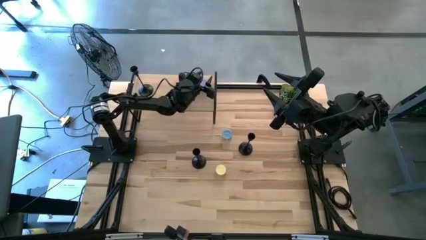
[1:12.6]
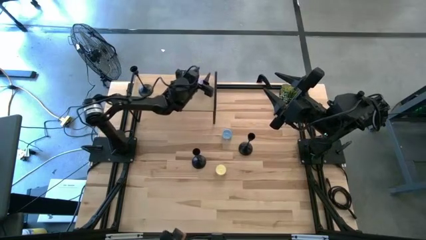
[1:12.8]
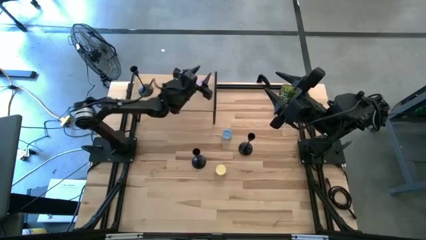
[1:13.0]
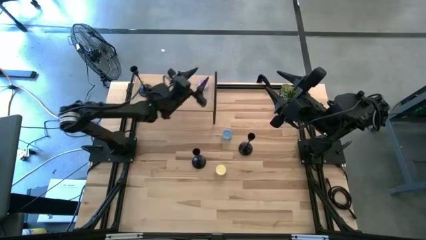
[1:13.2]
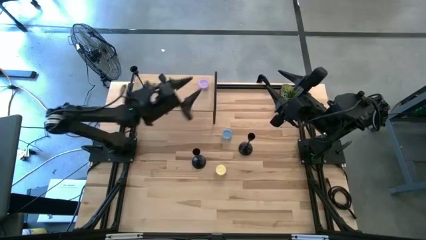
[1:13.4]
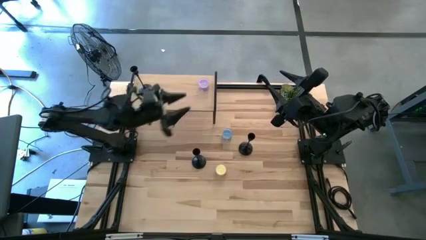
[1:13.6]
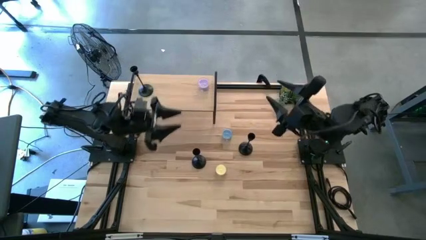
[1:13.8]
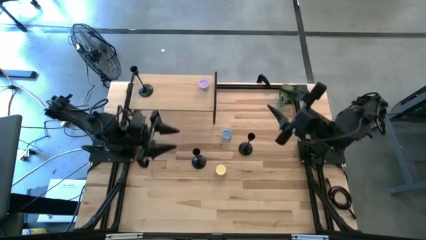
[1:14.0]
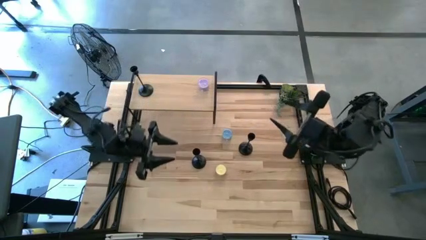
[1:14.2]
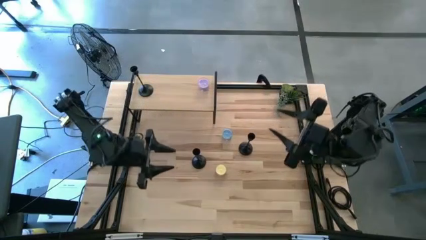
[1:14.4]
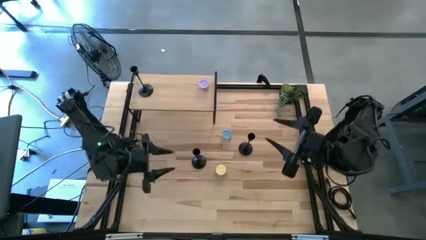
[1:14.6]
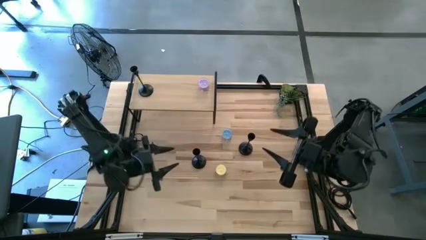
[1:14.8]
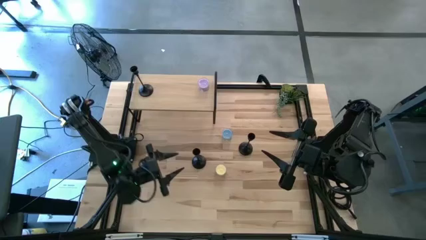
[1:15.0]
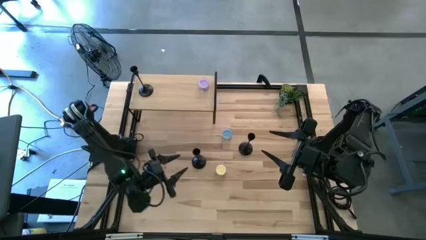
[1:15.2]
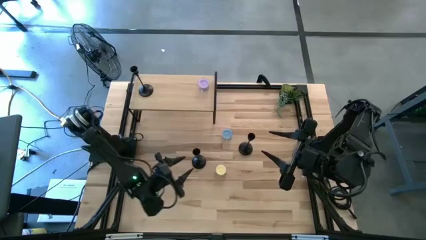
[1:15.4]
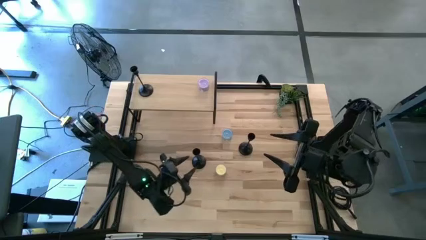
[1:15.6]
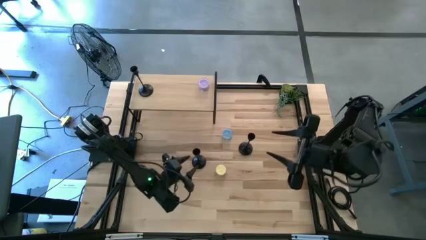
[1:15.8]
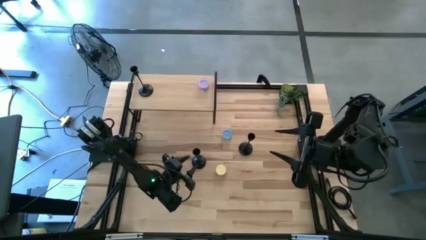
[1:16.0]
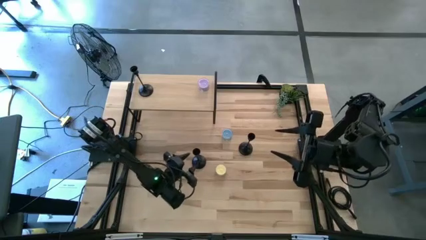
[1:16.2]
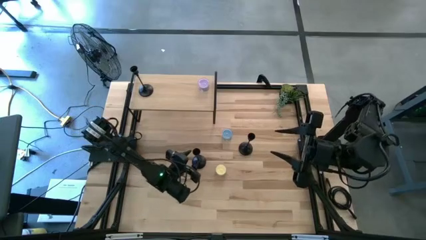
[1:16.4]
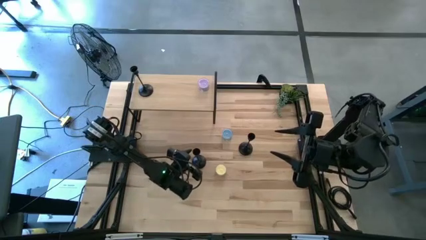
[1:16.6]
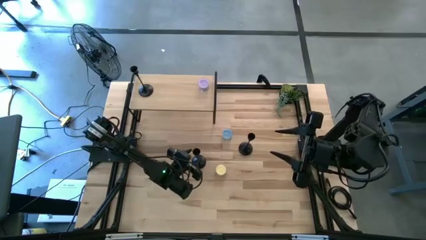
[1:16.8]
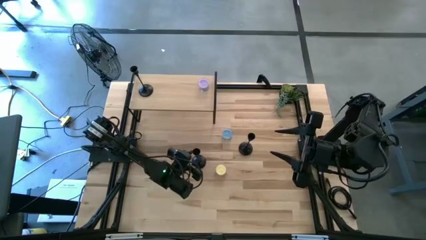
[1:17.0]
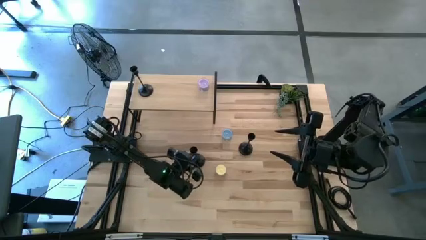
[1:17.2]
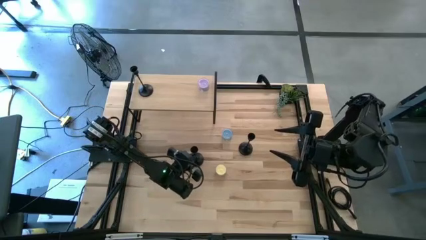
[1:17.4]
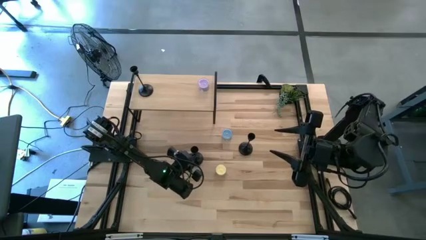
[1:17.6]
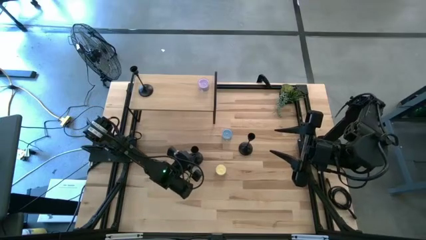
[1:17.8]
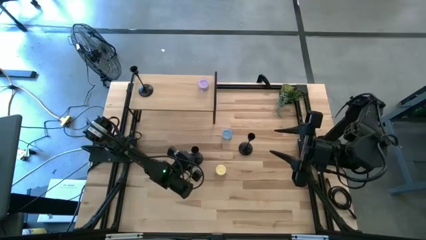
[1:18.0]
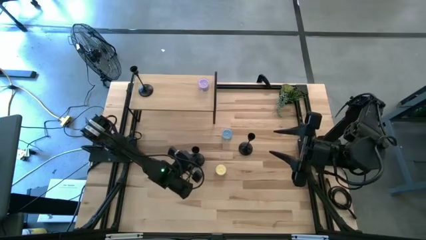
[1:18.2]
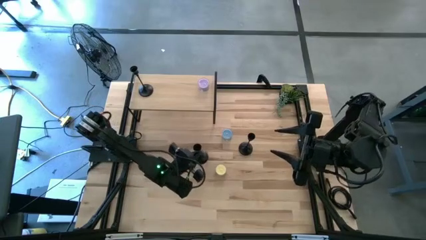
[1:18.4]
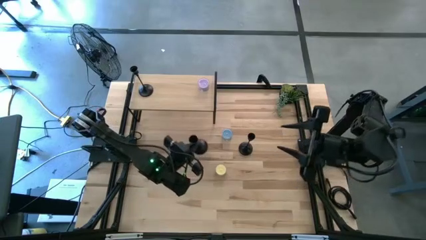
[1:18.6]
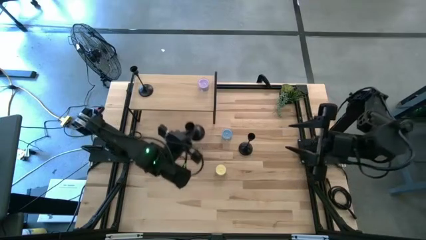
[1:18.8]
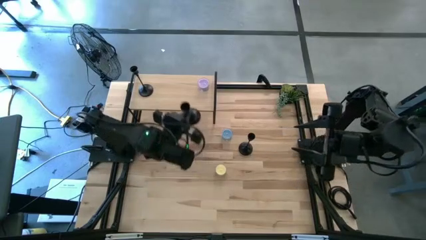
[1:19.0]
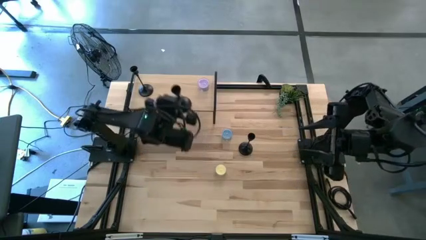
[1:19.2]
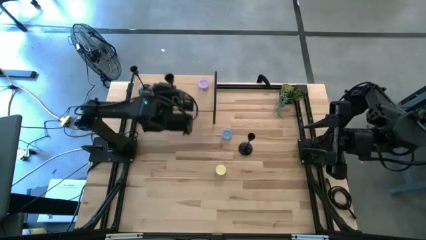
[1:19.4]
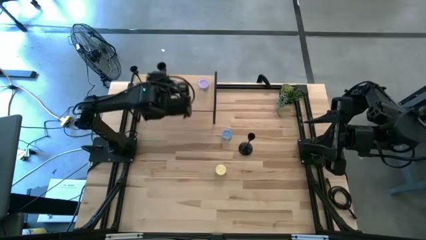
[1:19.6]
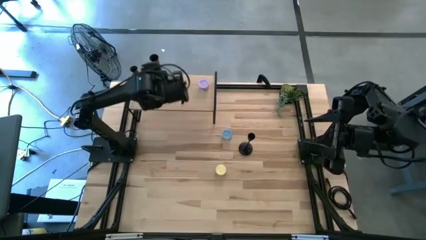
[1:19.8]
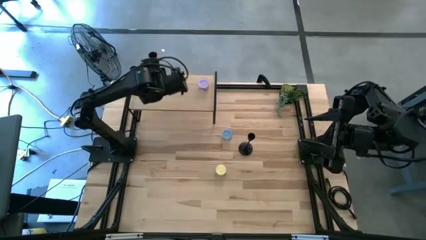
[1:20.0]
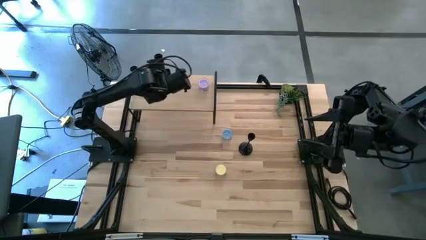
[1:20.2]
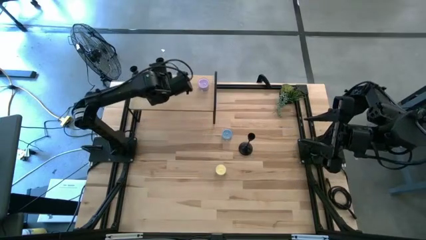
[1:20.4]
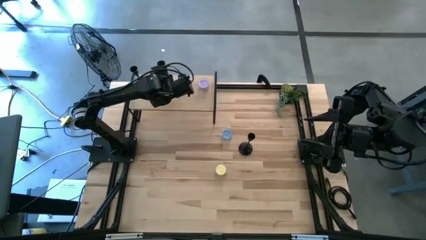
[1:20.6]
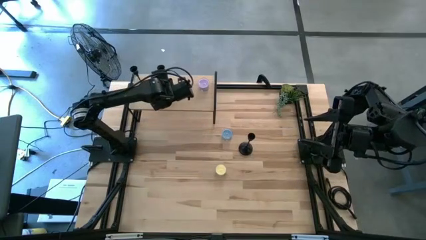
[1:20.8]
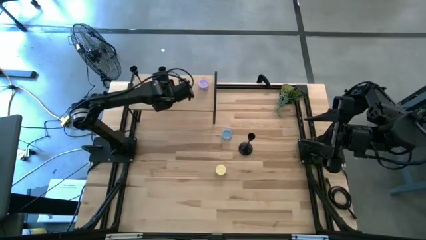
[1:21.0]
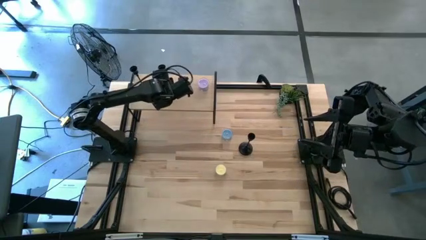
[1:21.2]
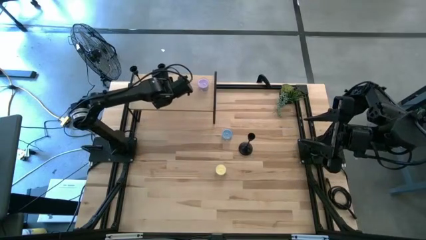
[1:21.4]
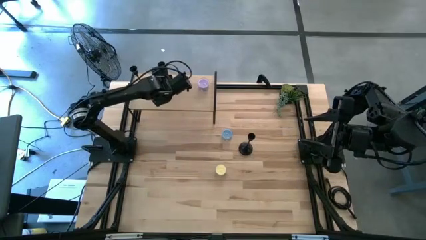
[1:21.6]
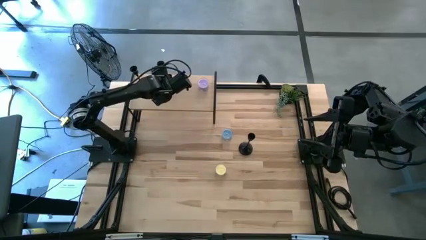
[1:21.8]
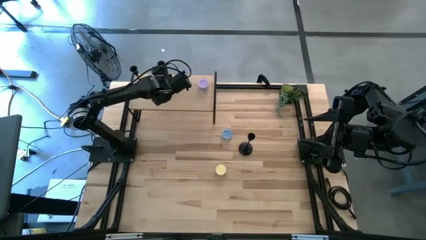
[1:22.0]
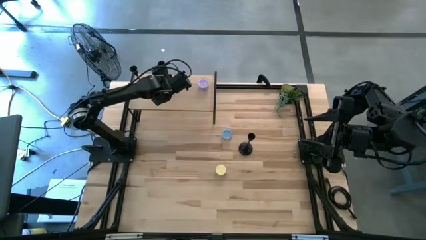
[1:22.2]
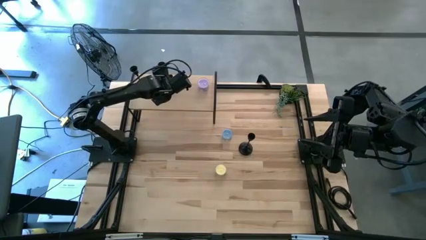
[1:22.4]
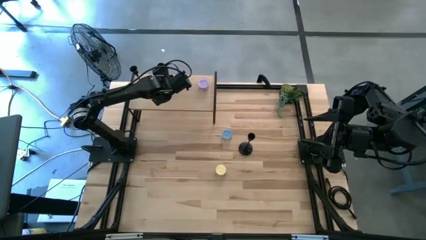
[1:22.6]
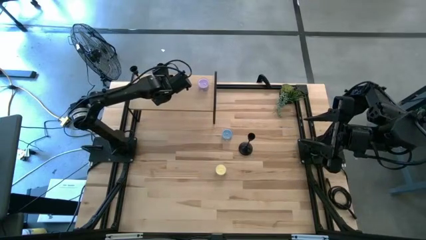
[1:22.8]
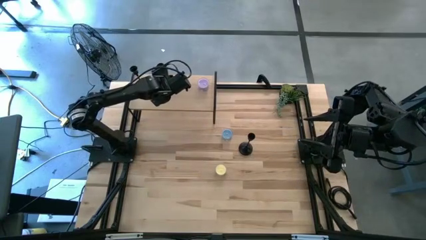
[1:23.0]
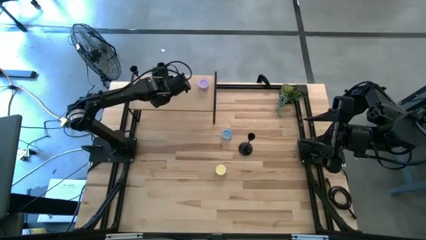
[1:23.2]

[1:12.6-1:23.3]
Task: Pick & Place candle stick holders
Put the left black candle holder on the shelf

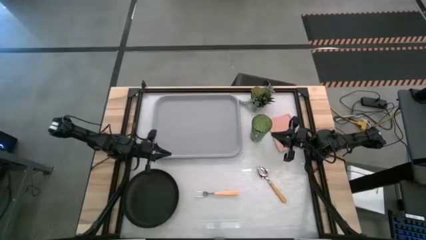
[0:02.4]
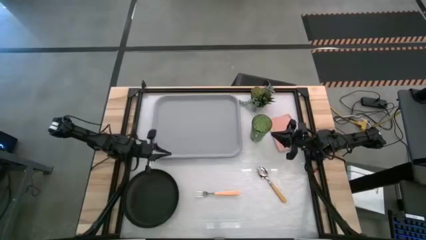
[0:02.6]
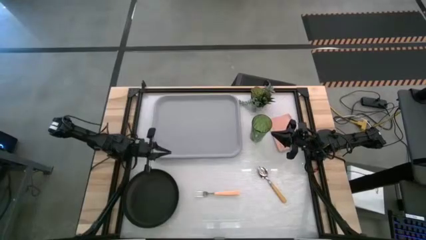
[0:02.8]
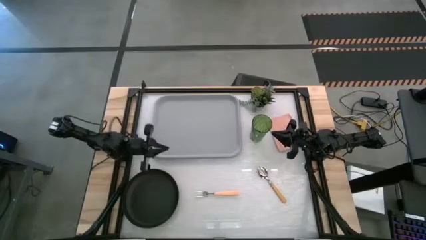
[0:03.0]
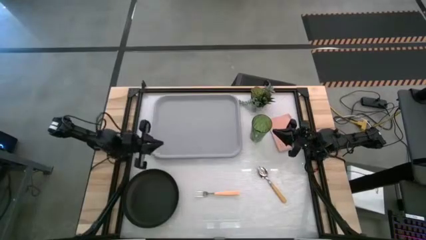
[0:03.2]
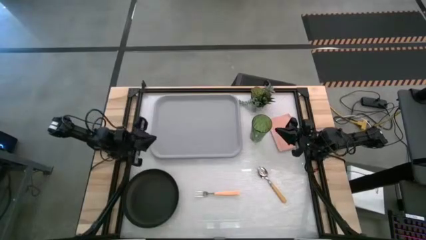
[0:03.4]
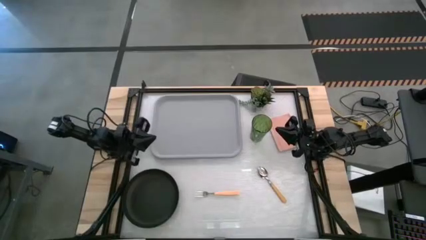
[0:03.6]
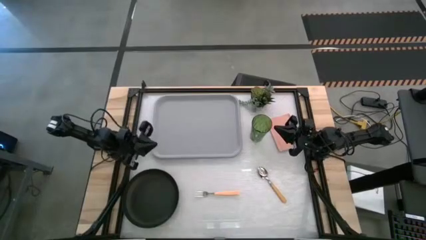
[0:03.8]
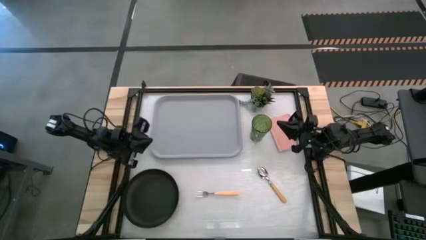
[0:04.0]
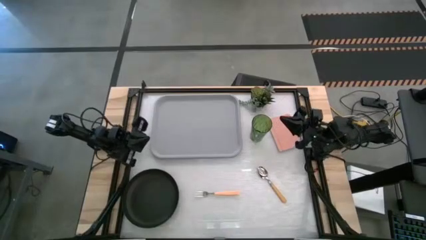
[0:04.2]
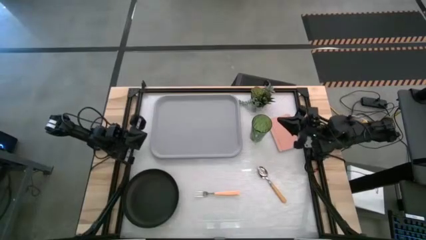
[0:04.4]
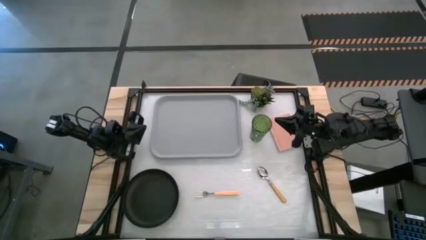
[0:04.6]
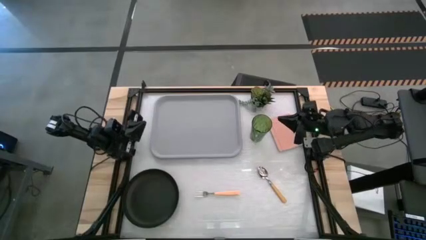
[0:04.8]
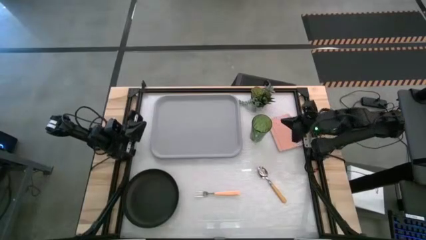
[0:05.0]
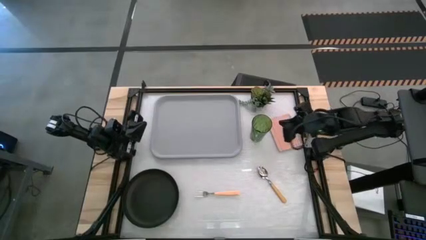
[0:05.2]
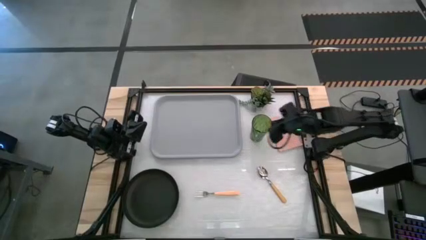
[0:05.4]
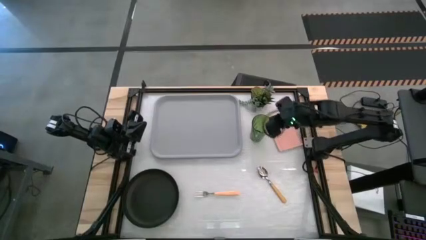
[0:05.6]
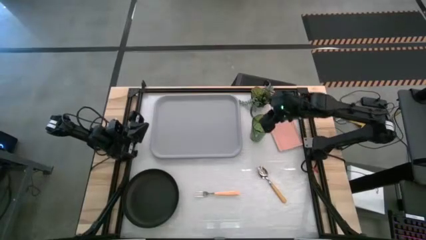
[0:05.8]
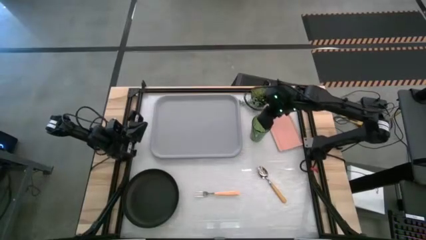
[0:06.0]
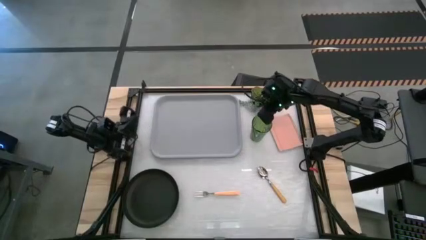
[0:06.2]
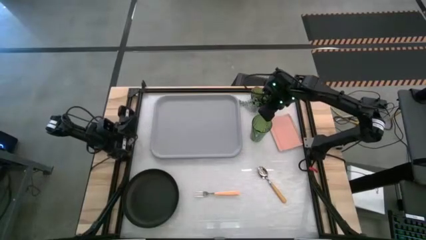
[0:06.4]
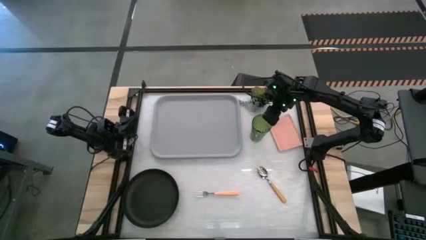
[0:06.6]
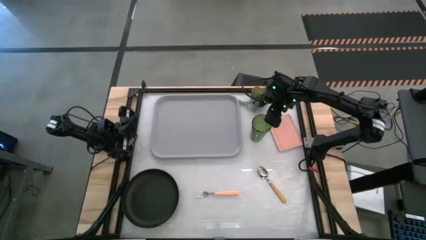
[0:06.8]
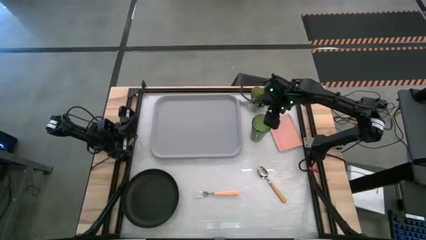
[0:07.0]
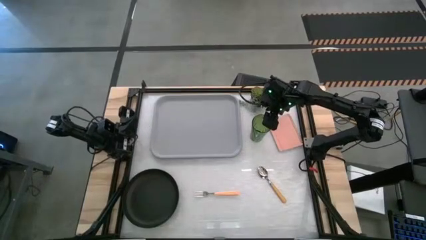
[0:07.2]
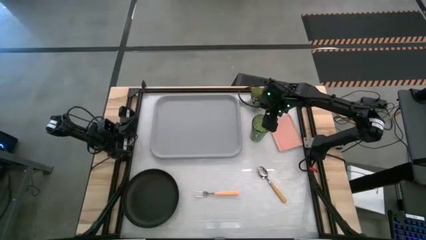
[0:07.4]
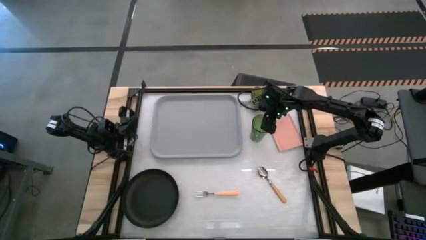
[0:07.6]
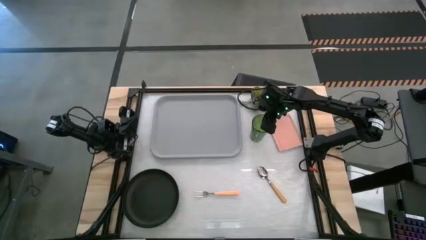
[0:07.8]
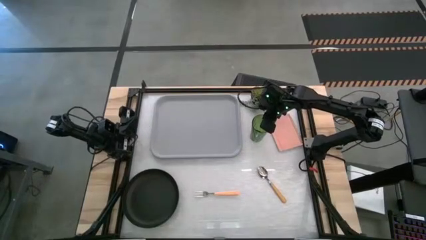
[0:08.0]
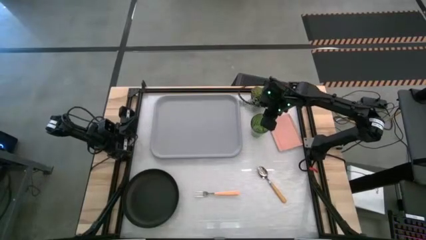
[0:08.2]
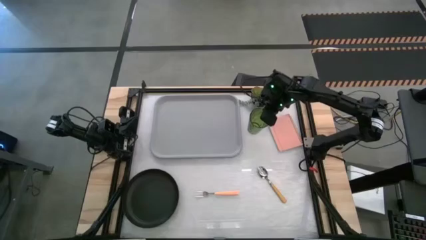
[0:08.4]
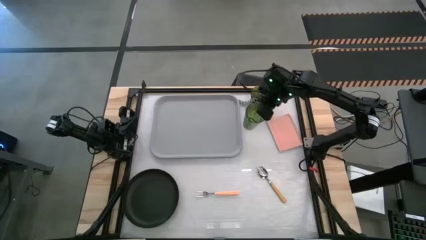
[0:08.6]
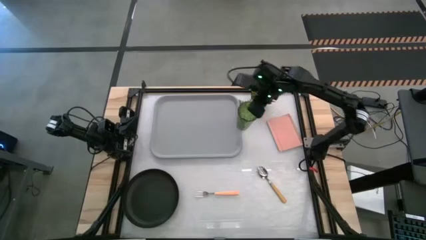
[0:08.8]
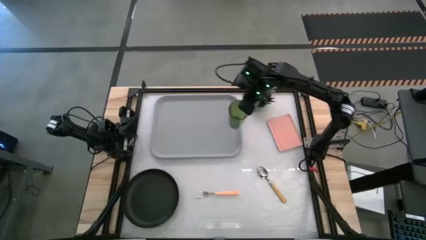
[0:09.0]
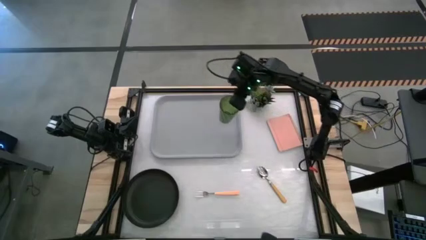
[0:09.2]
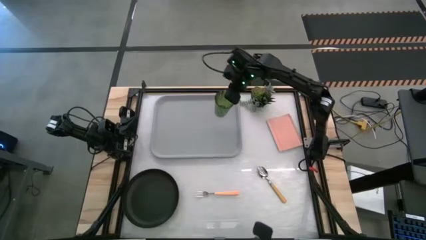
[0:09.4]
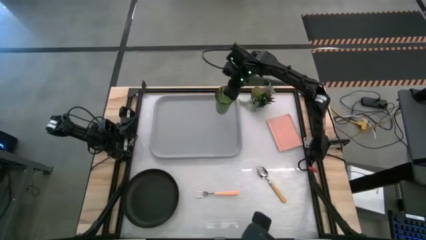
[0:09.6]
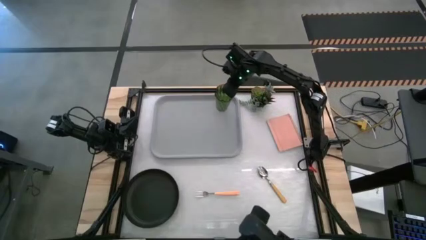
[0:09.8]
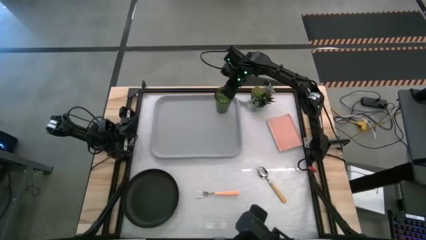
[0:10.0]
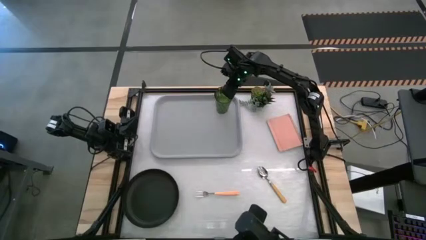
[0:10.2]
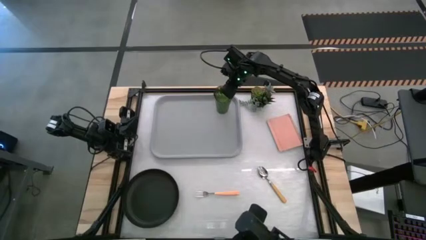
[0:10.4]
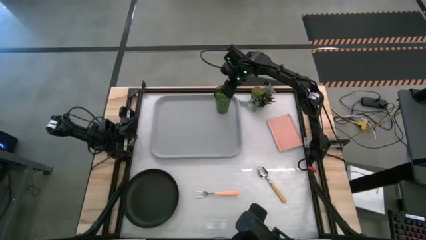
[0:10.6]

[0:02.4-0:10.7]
Task: Pick and place plate/cup/fork/spoon on tray
Put the green cup on the gray serving tray
